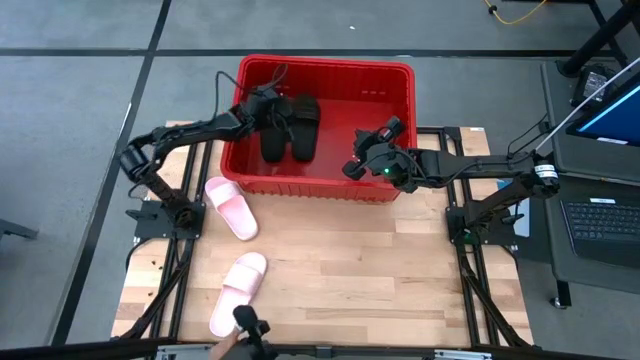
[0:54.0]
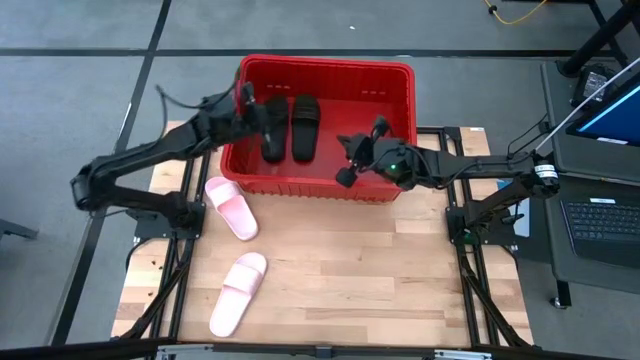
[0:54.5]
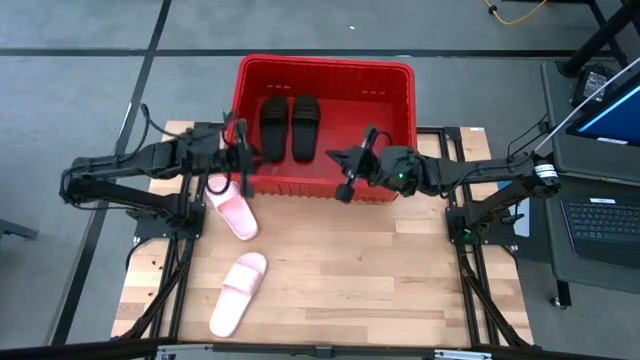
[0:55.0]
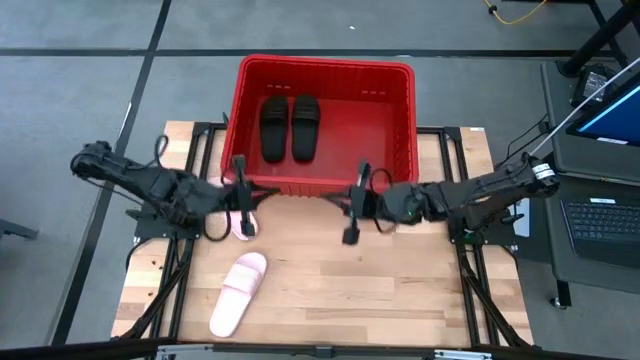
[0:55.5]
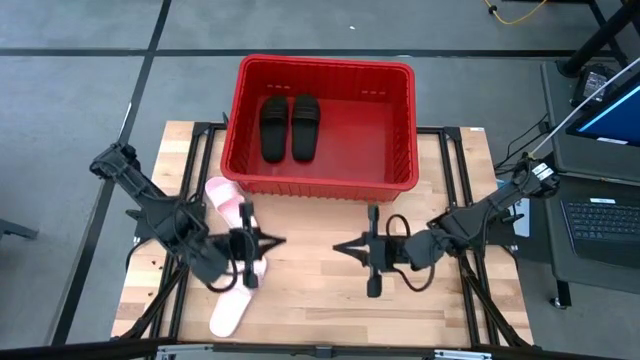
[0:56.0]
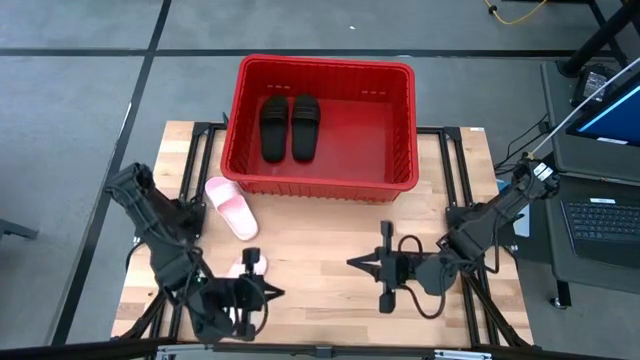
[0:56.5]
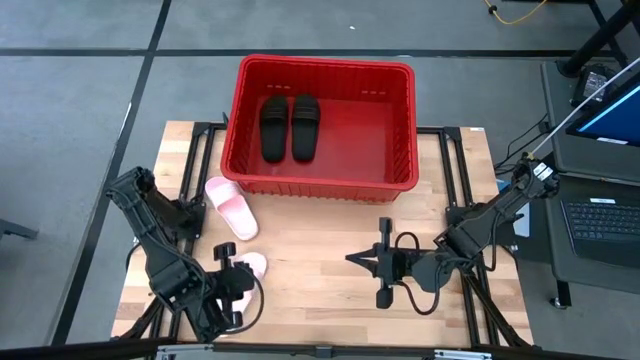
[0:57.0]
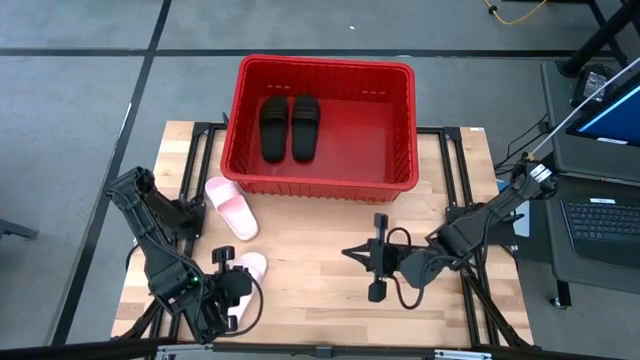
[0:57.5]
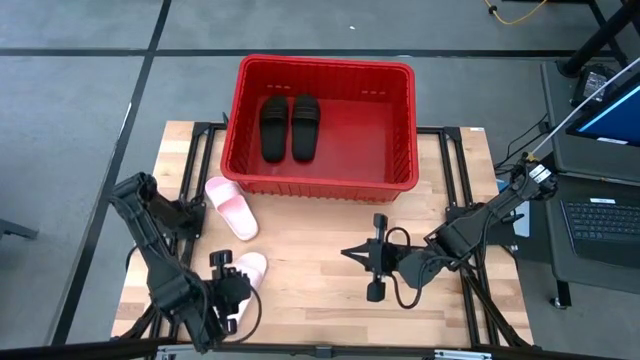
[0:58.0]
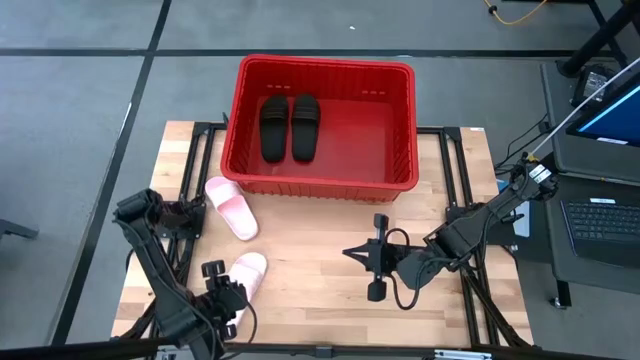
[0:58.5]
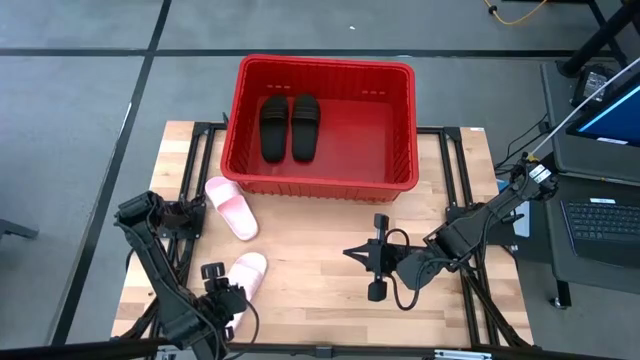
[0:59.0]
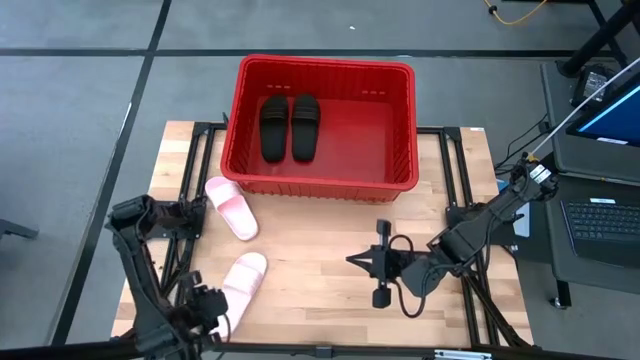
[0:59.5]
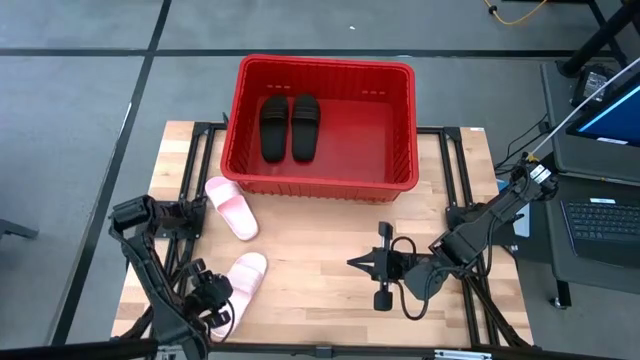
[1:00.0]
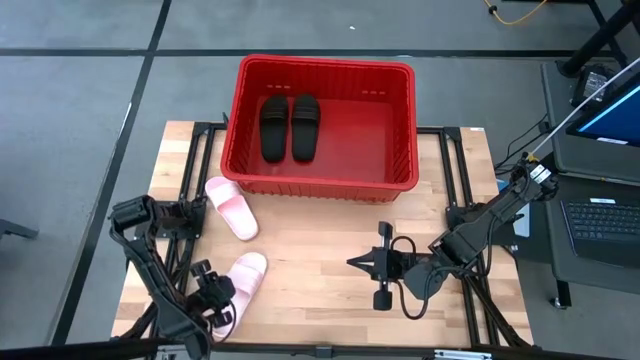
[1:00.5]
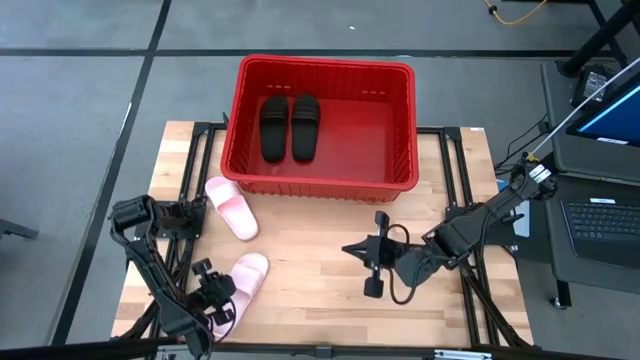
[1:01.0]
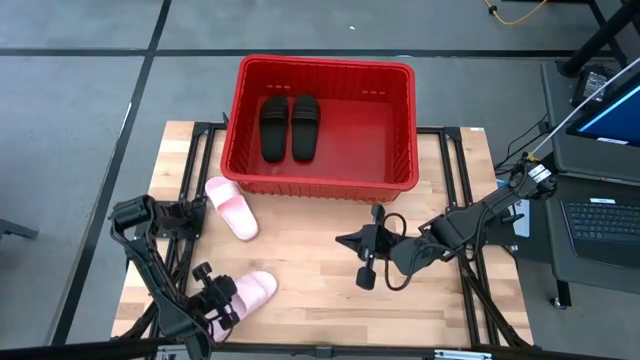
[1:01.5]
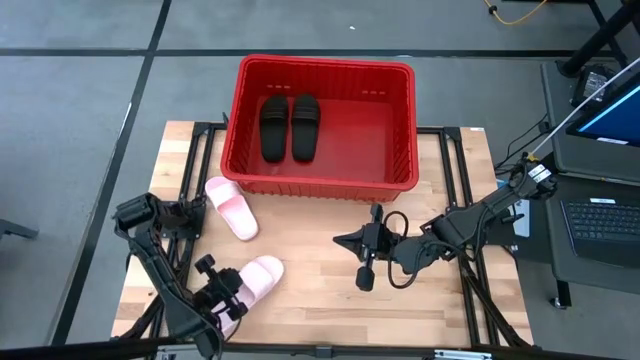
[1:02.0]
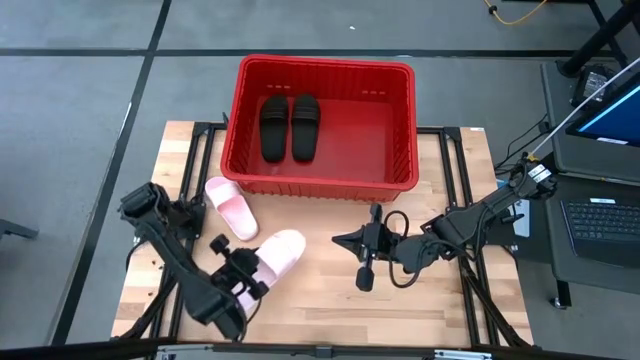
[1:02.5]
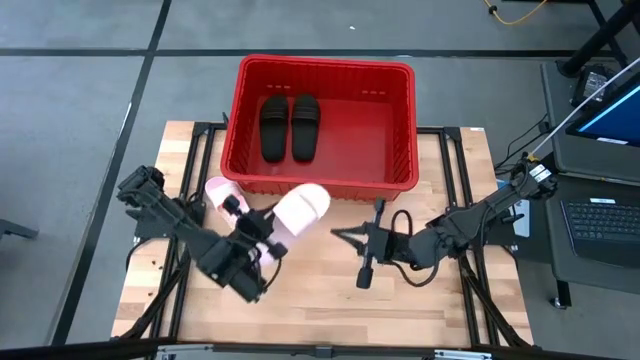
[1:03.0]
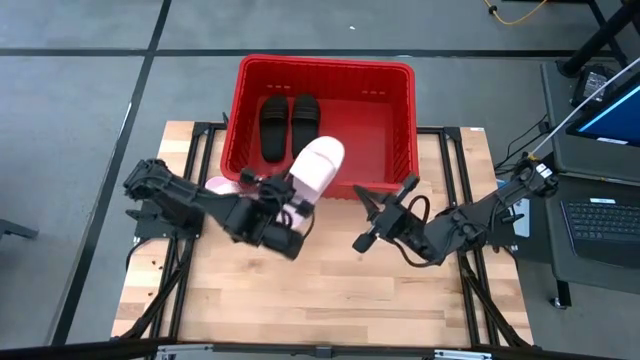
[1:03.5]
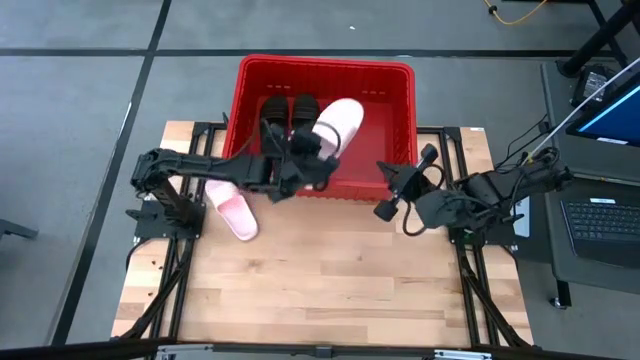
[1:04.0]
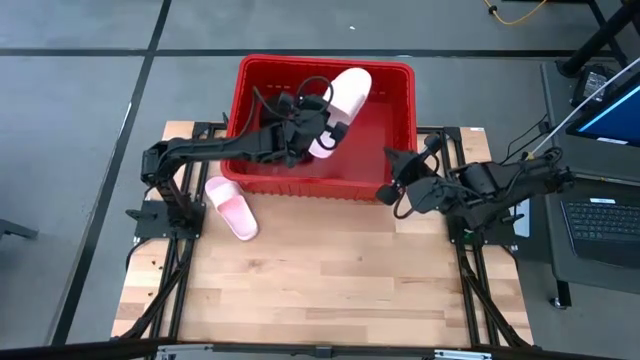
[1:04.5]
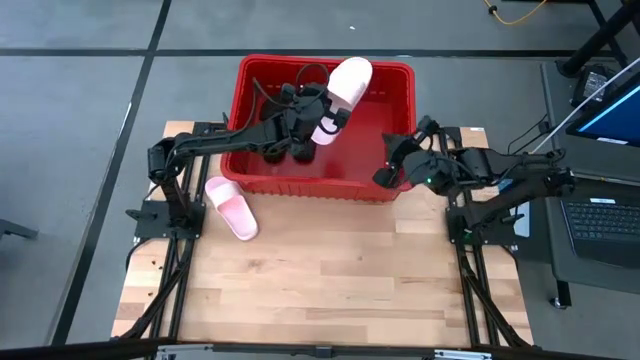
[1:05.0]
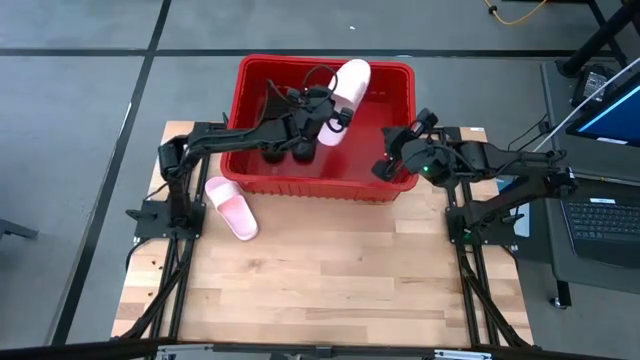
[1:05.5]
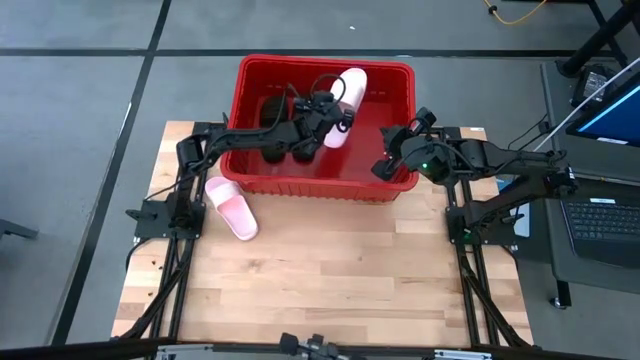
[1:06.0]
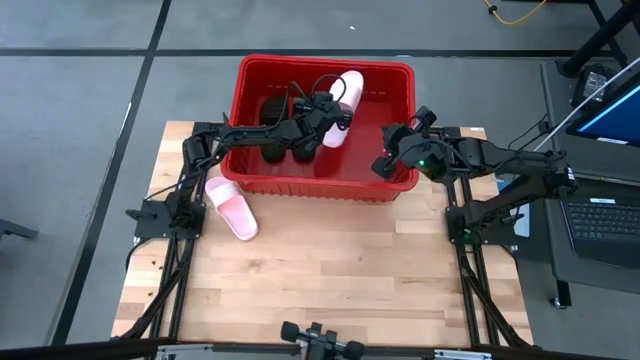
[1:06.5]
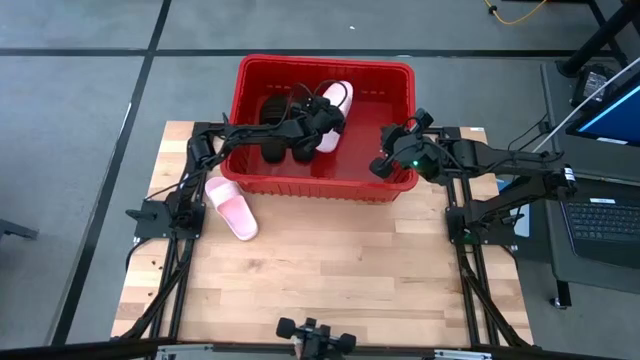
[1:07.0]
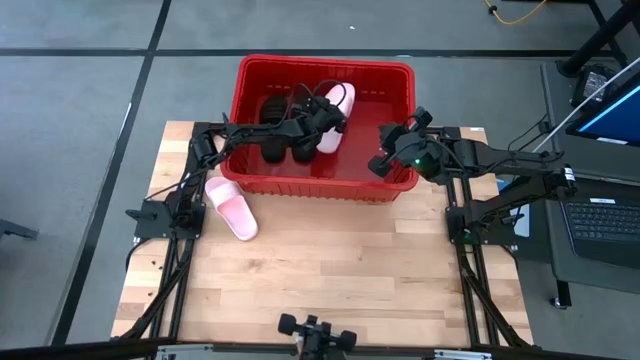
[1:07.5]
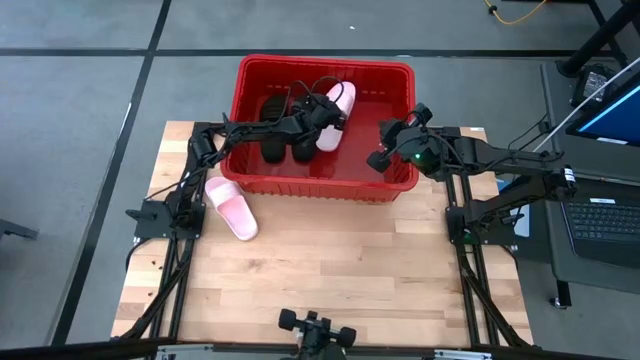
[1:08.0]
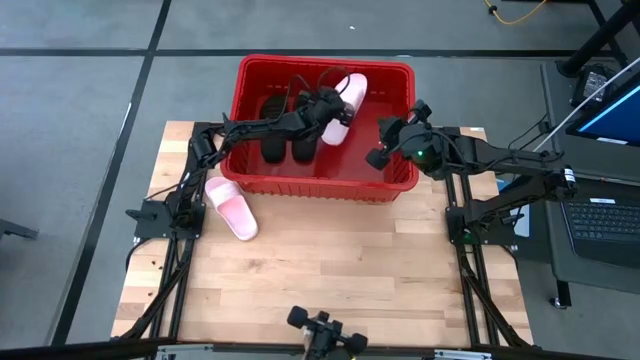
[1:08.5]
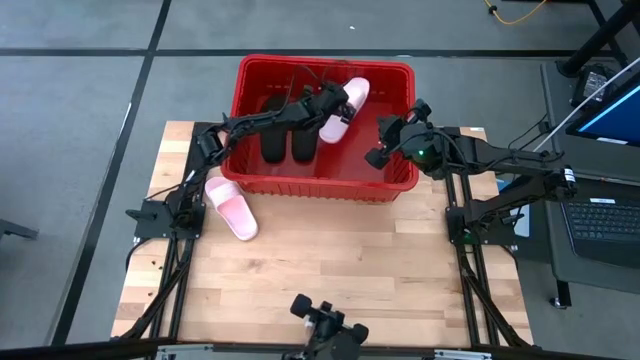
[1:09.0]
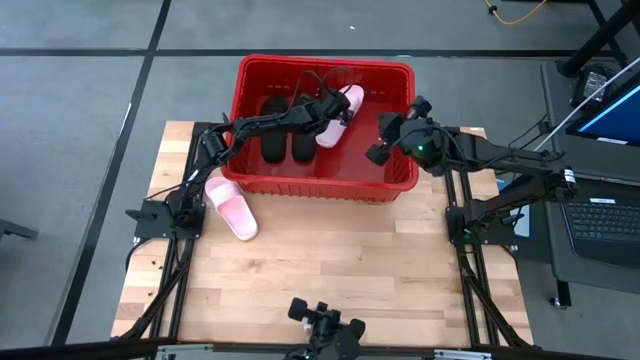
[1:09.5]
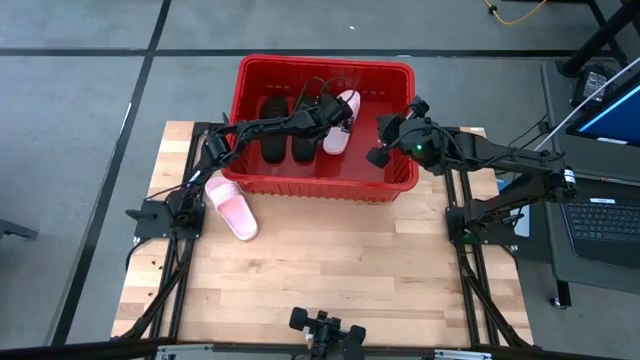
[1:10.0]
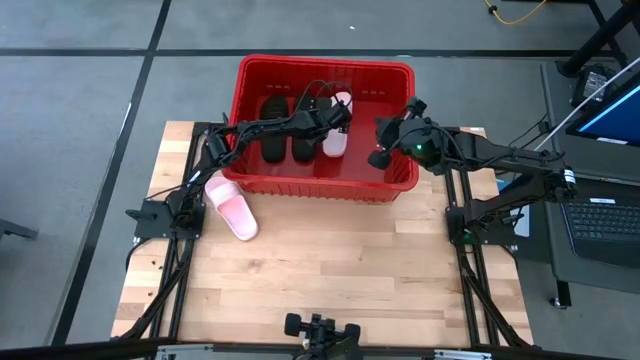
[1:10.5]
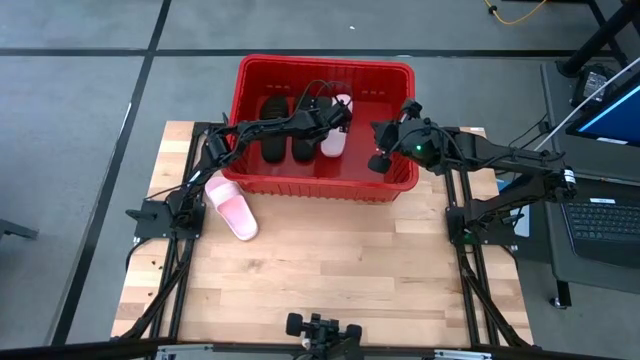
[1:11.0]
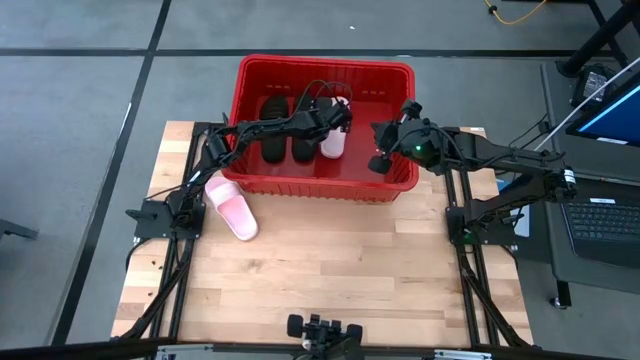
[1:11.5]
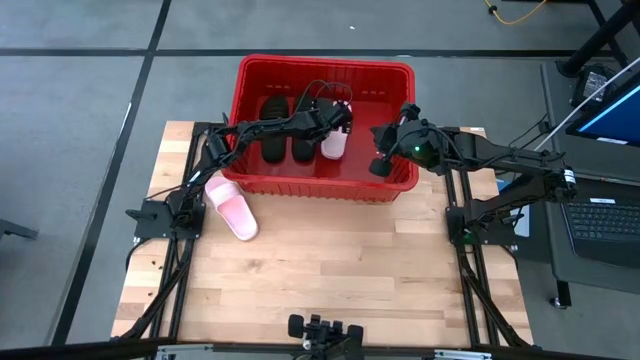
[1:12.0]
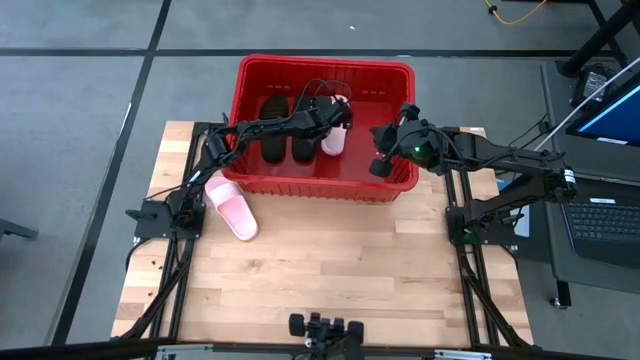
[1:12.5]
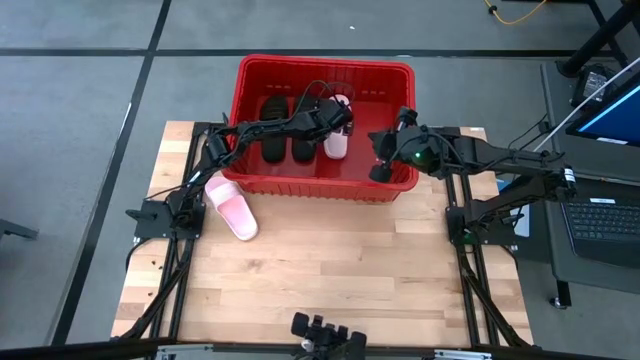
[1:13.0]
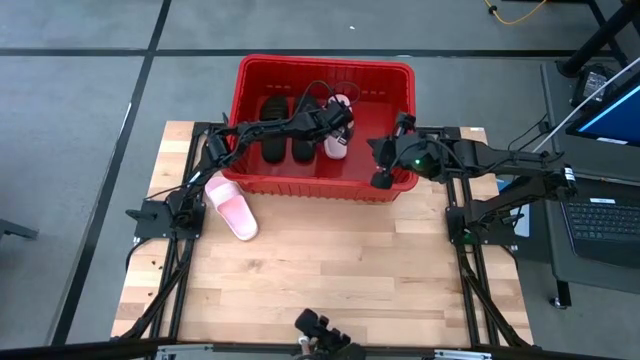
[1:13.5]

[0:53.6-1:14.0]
Task: Pick and place slides into bin
Put the bottom pink slide into the red bin

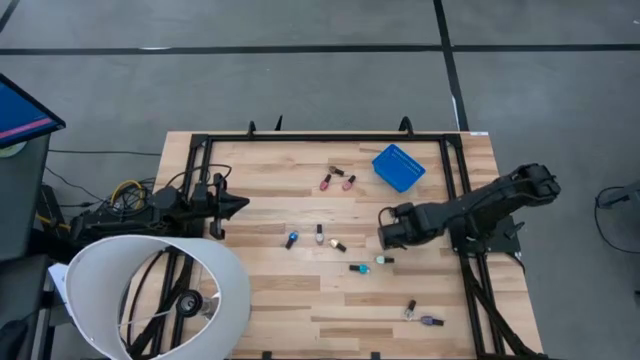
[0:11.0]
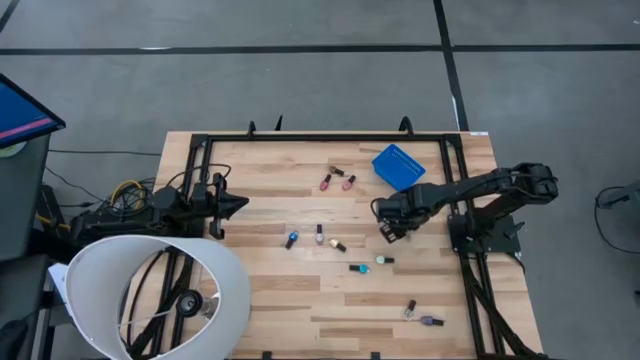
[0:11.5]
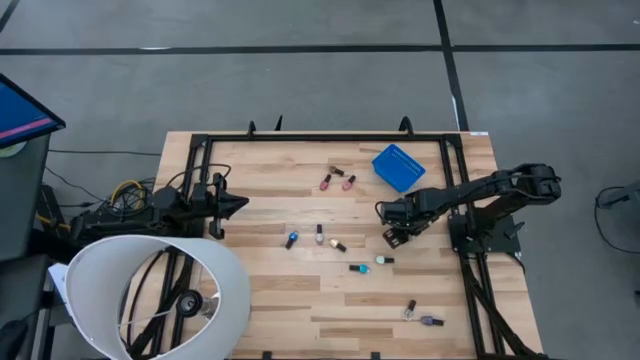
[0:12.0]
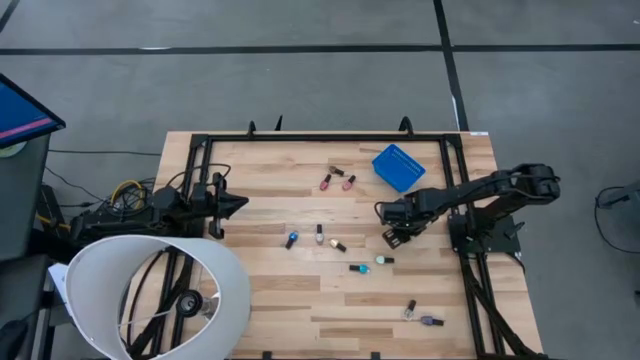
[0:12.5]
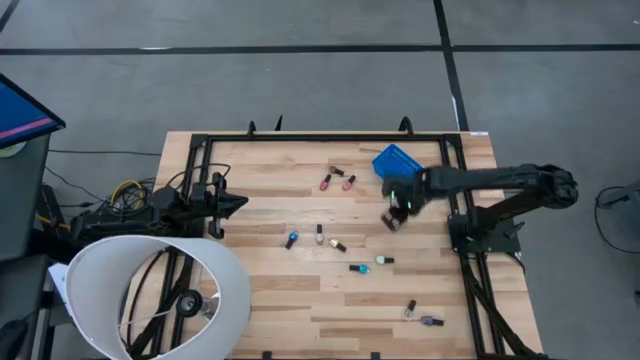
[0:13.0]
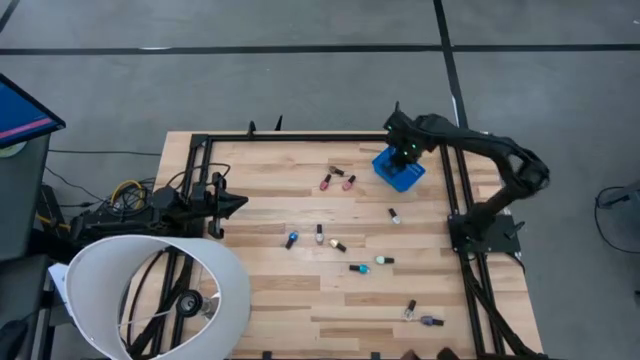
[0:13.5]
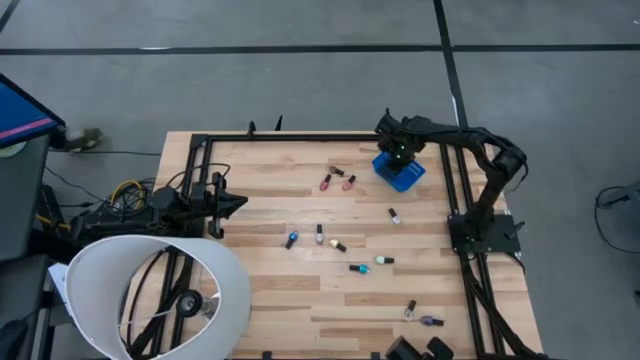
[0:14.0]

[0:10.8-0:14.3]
Task: Pick & Place Nail Polish
Put the top transparent nail polish bottle into the blue bin
